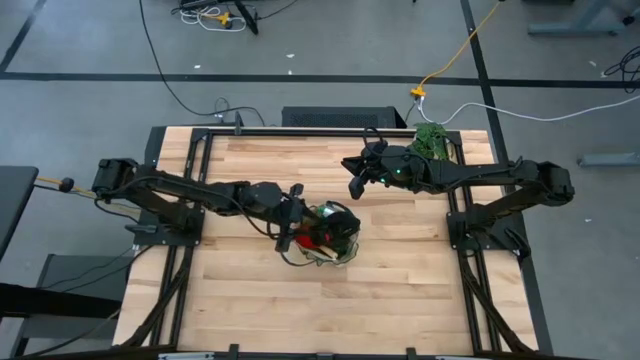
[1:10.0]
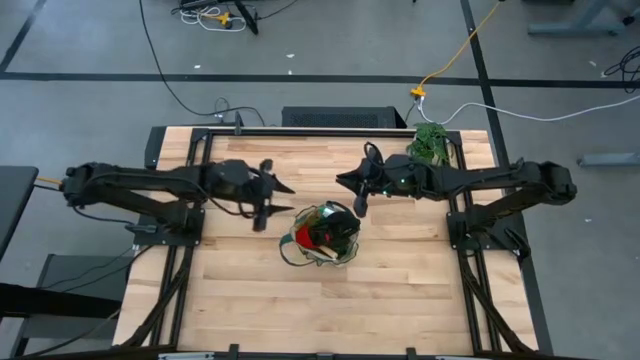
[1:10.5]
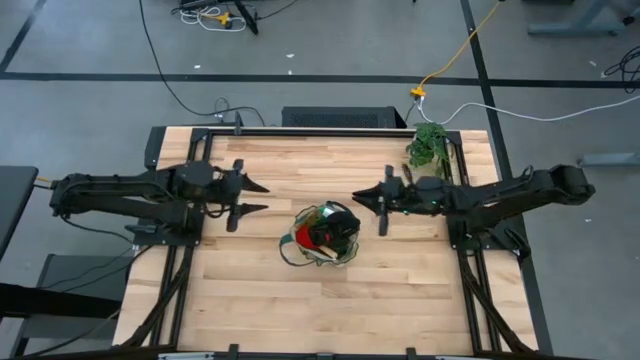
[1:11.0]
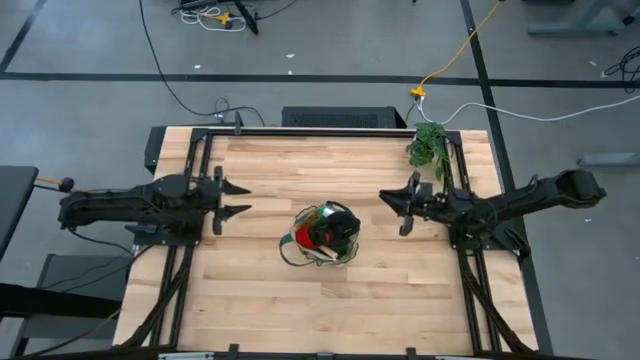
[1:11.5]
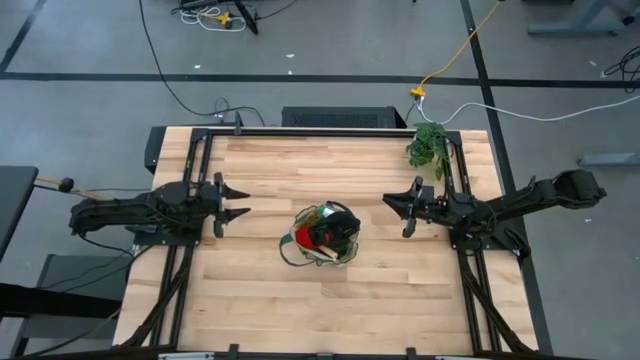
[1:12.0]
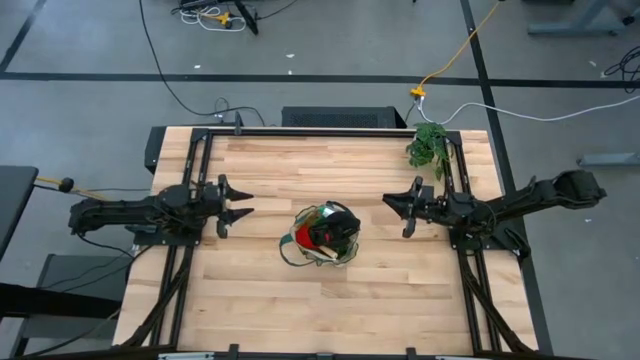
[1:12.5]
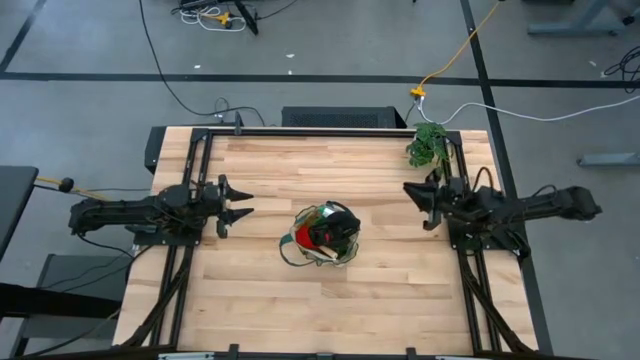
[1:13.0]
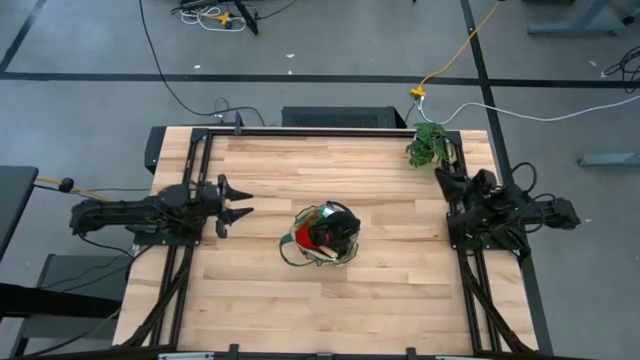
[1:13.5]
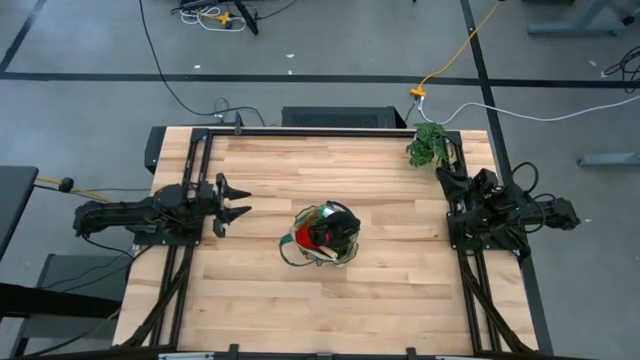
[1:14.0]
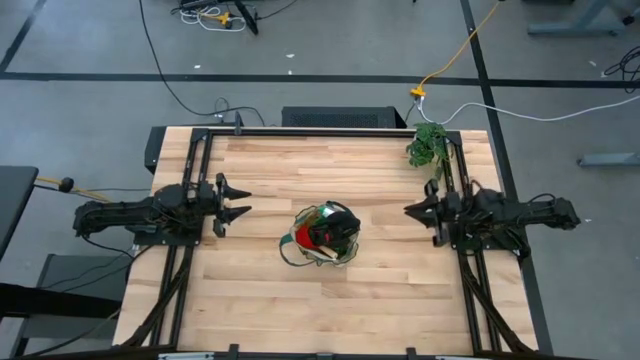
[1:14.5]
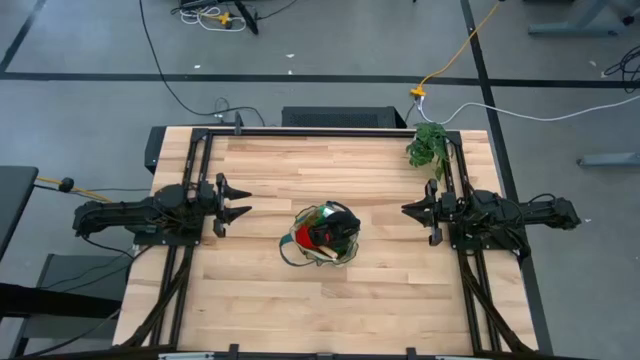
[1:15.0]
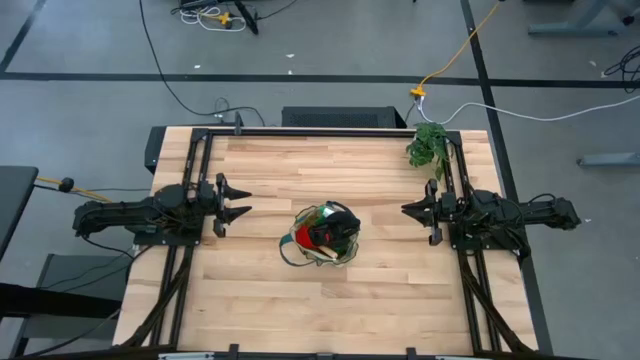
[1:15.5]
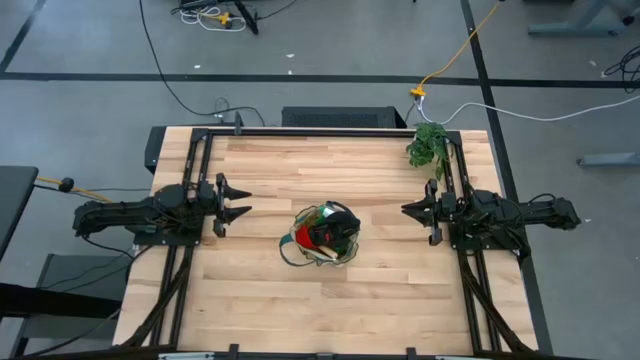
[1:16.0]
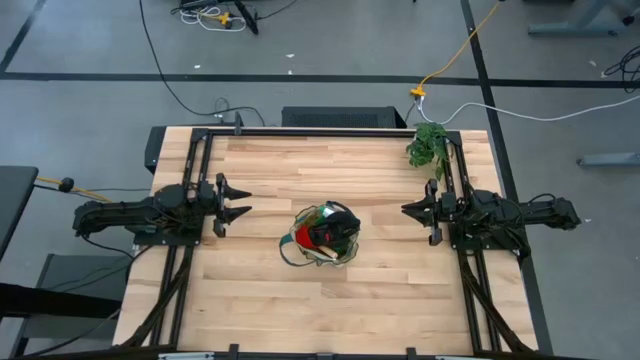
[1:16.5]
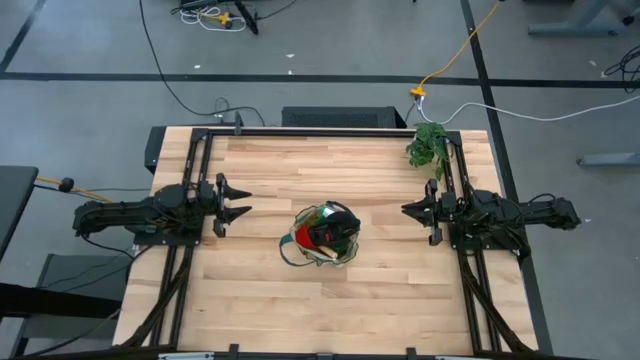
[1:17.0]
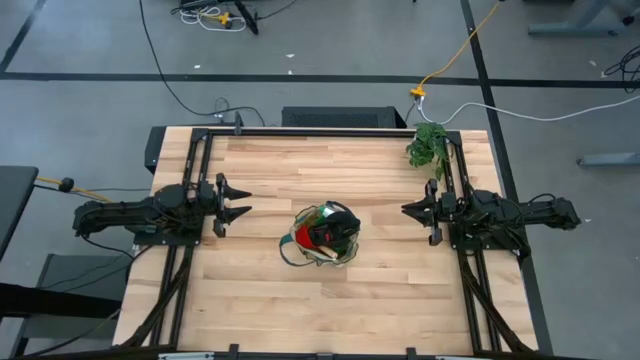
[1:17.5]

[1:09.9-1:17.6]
Task: Pick & Place Garden tools in Gardening bag
Return to Home Position

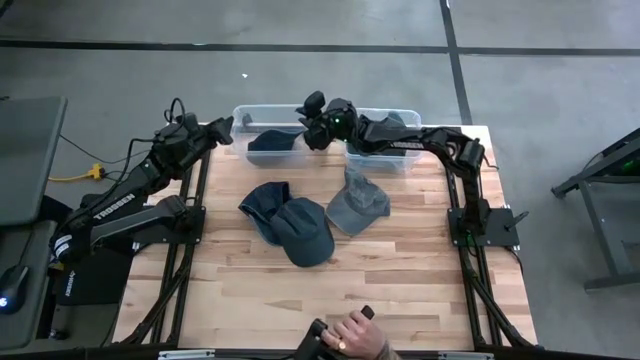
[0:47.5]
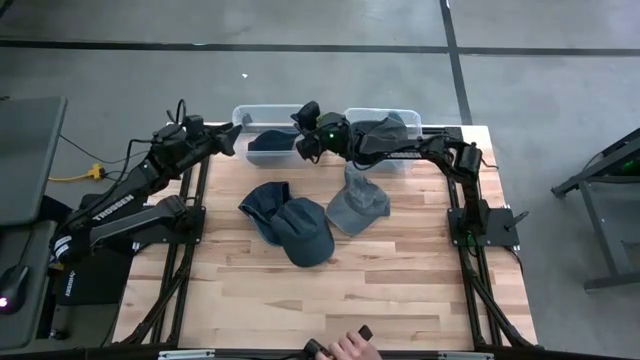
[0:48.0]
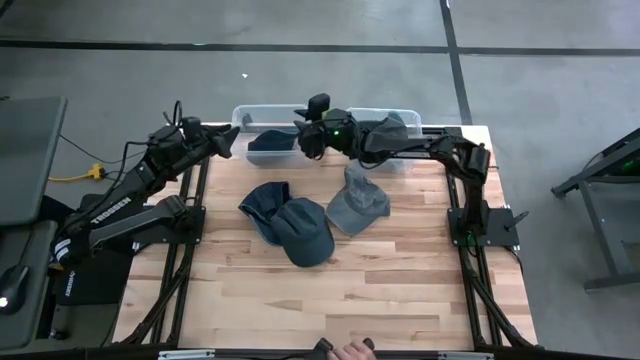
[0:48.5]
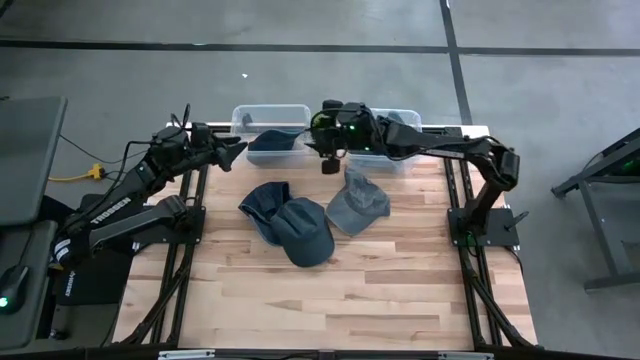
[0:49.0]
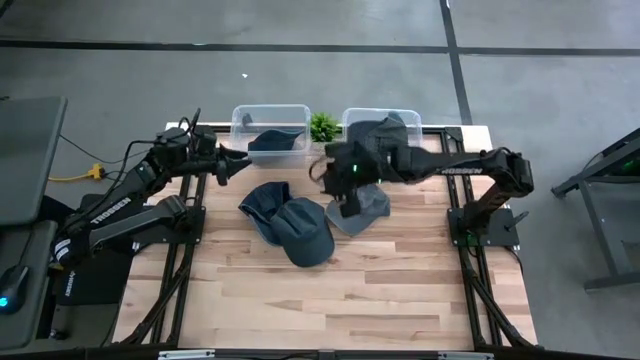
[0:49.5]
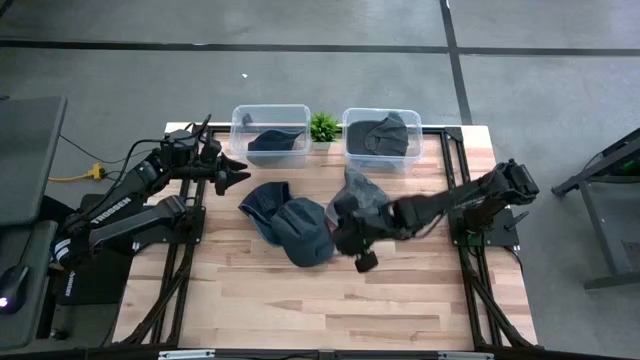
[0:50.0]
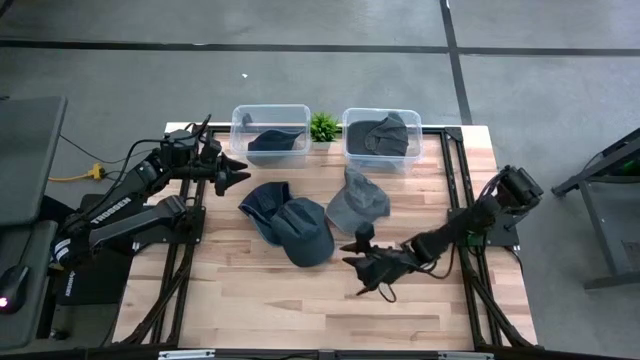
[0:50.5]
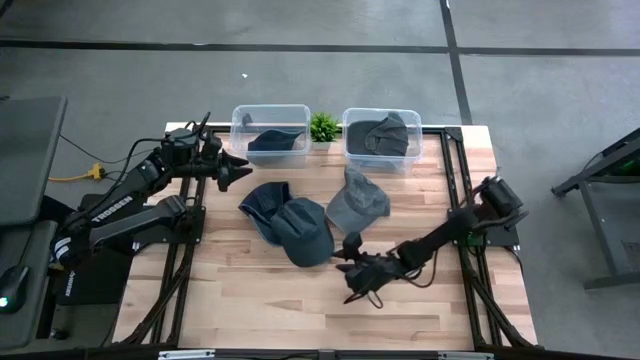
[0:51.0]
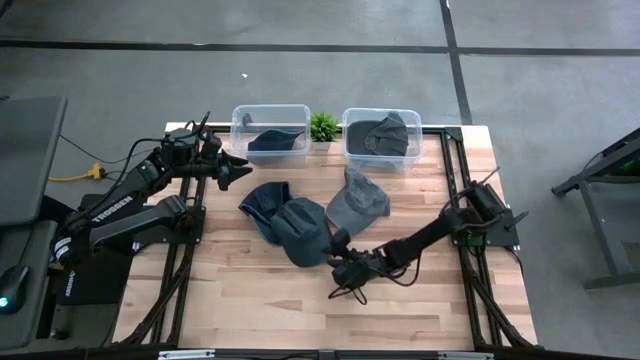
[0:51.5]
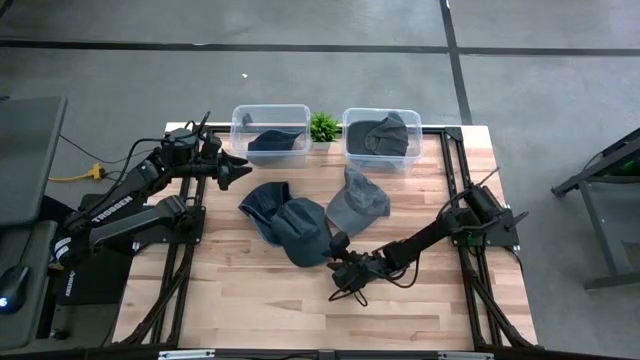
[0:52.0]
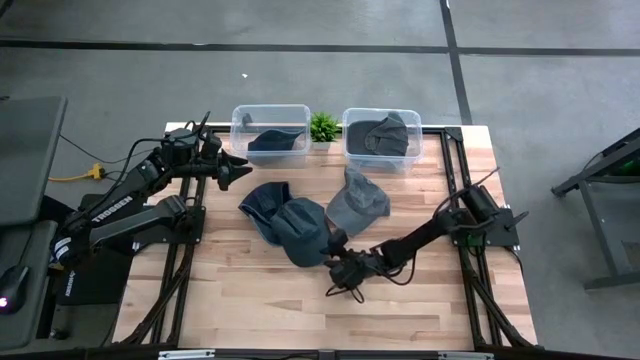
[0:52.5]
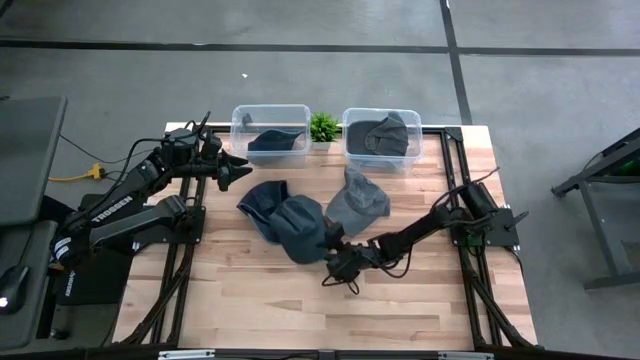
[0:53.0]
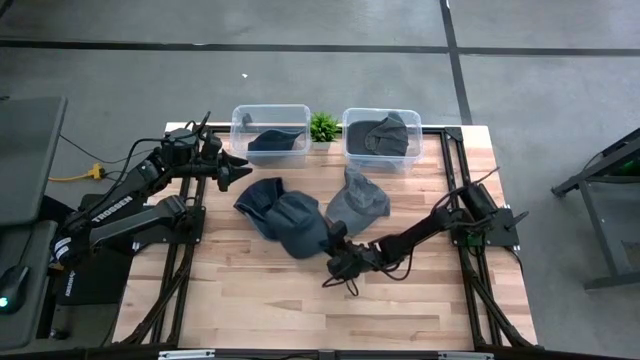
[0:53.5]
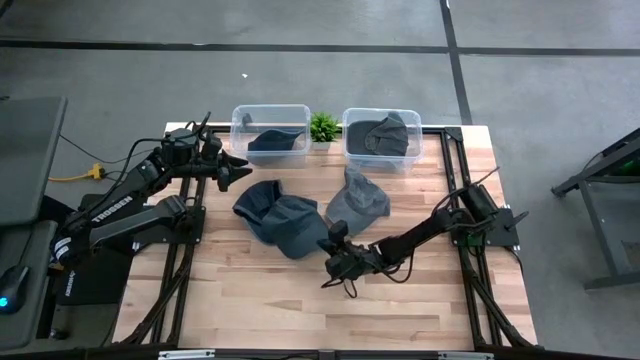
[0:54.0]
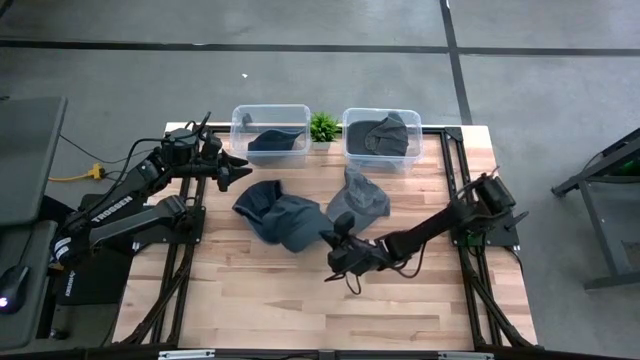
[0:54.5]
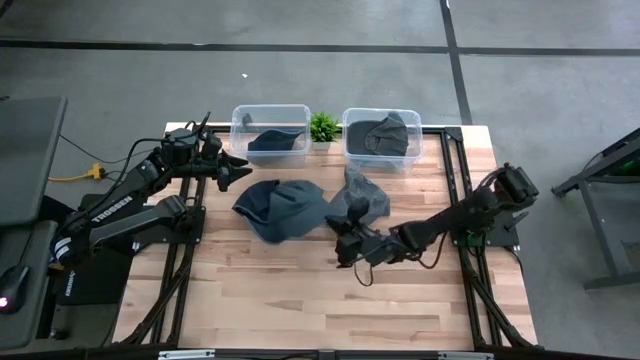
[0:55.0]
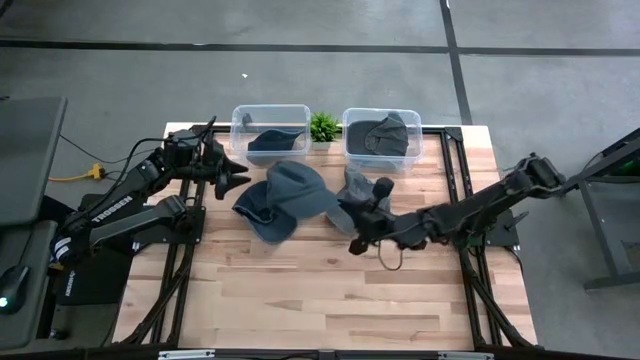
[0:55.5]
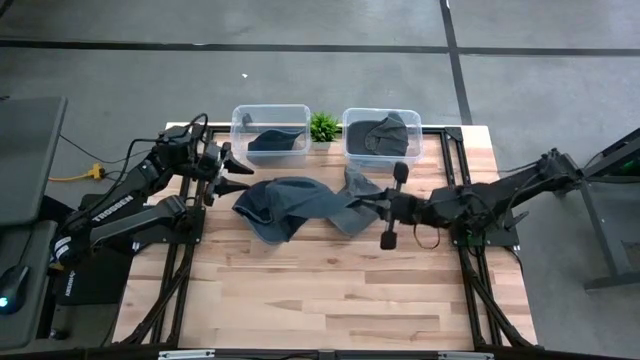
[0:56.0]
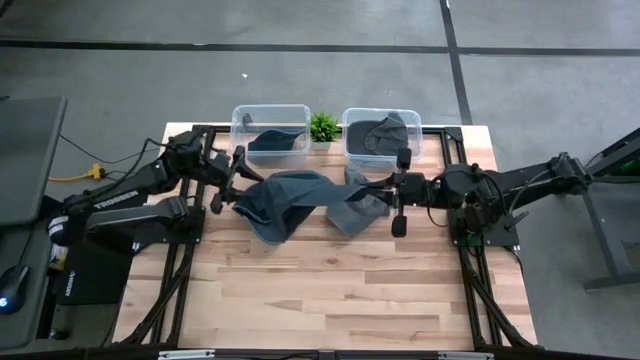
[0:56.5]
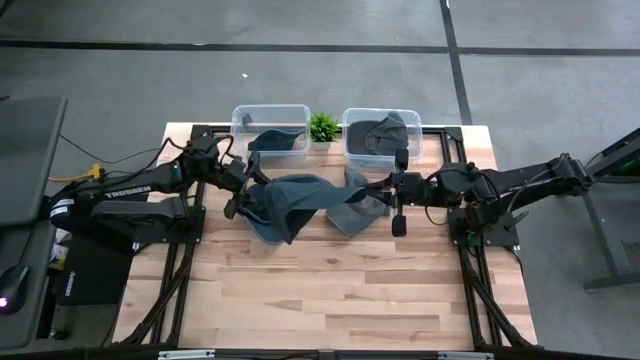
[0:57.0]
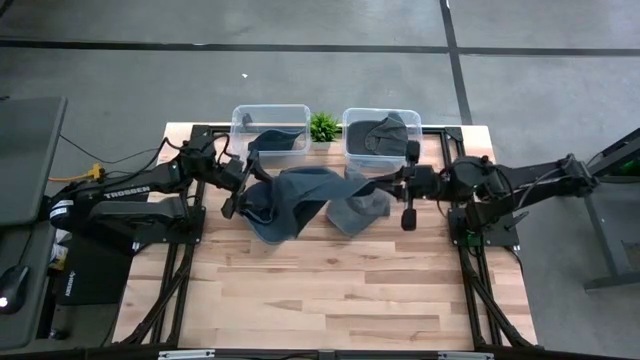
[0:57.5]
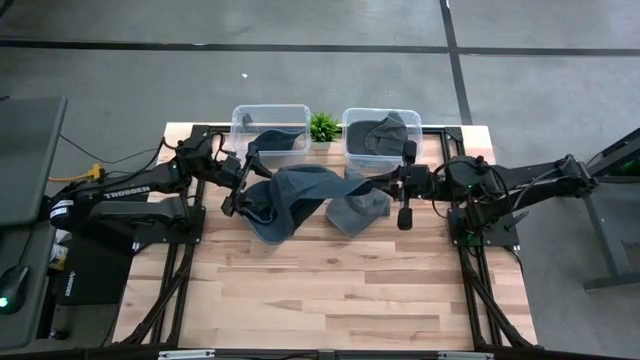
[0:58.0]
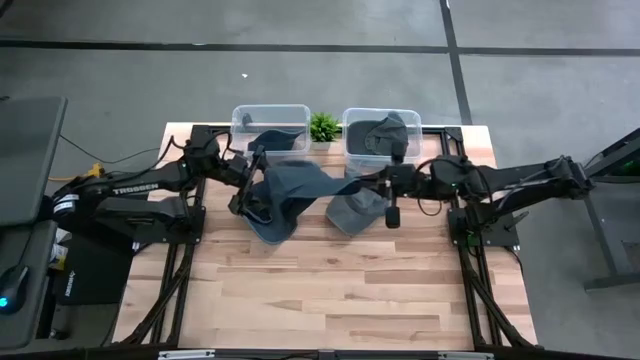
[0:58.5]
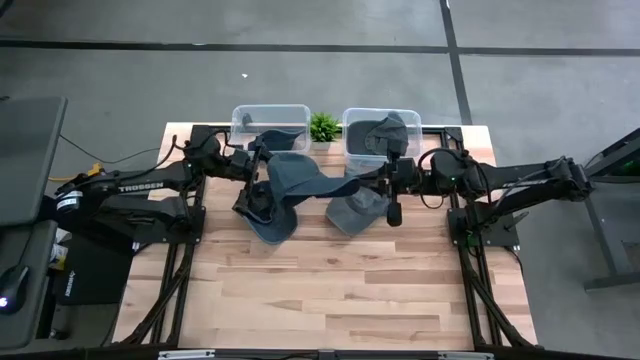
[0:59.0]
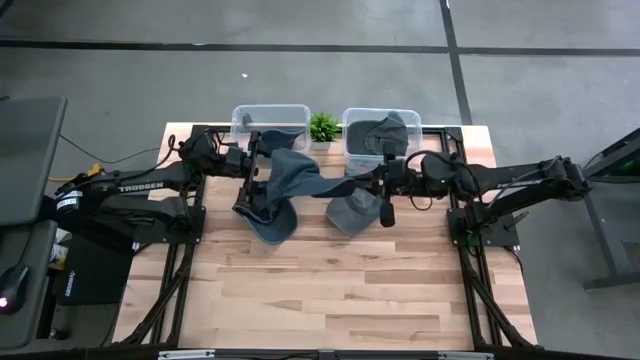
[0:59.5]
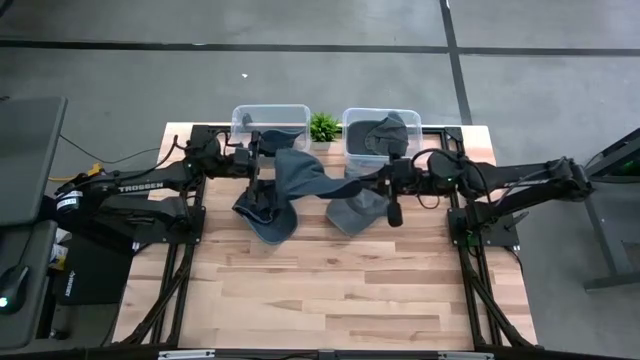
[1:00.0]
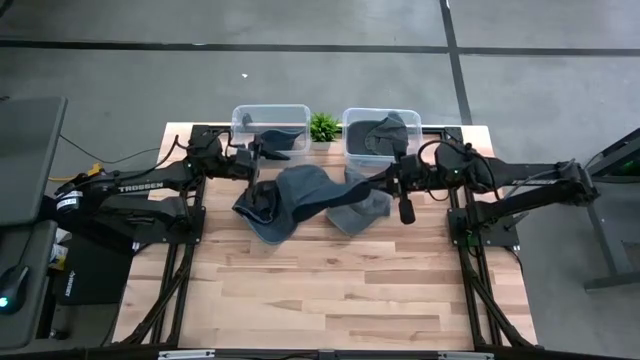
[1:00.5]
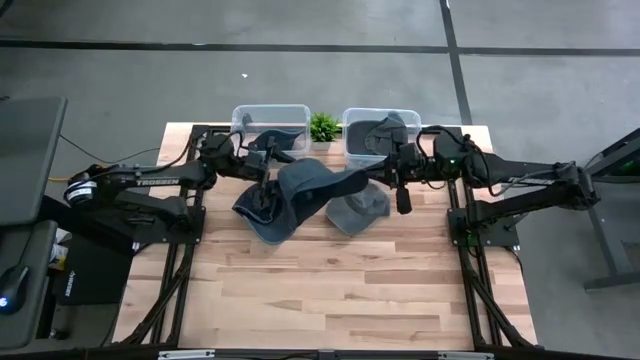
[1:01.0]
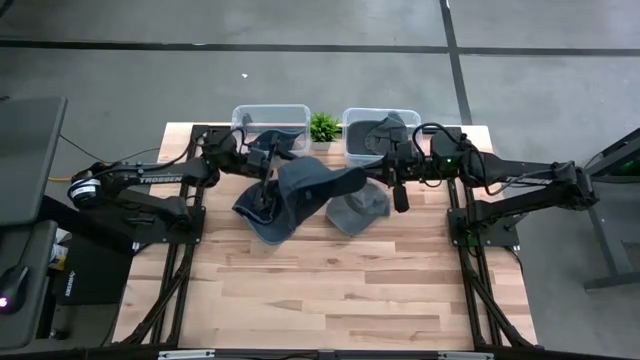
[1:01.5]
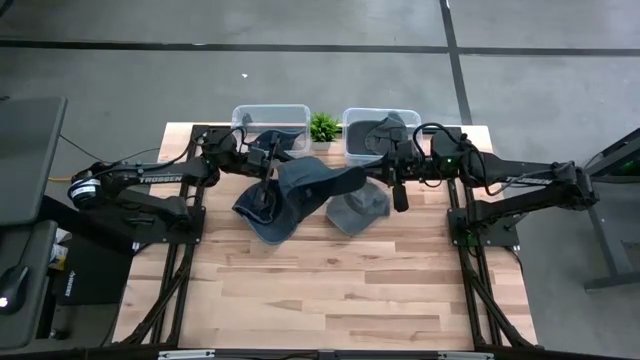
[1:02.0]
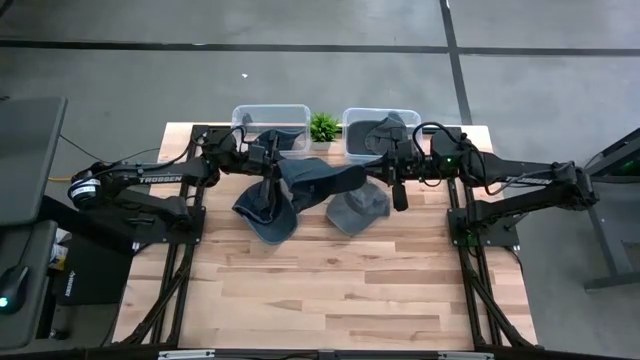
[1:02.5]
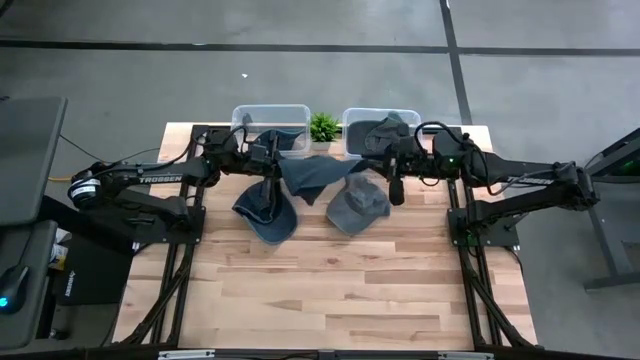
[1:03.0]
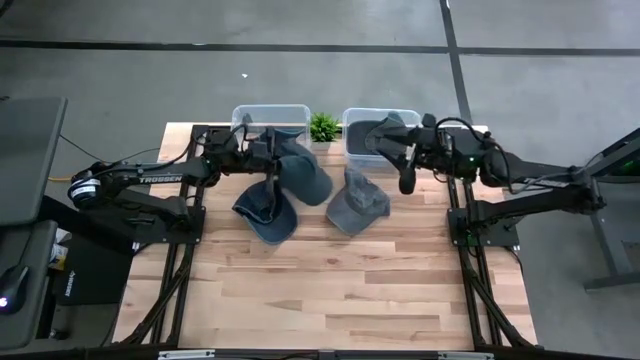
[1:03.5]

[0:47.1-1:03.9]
Task: Pick & Place hat
Put the bottom blue cap into the left transparent bin
